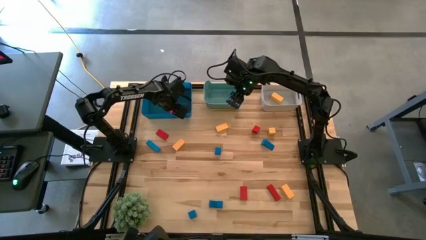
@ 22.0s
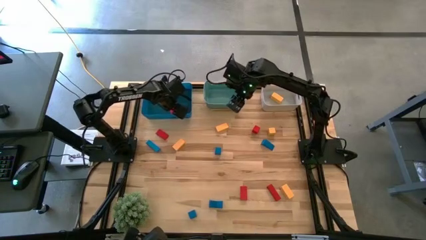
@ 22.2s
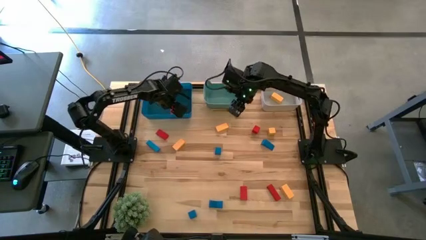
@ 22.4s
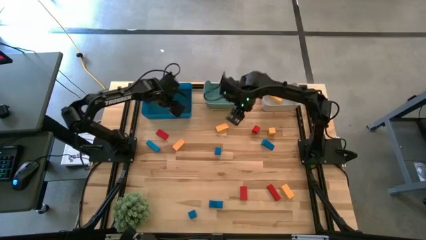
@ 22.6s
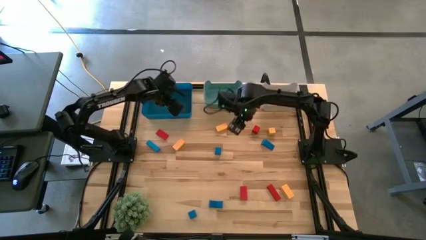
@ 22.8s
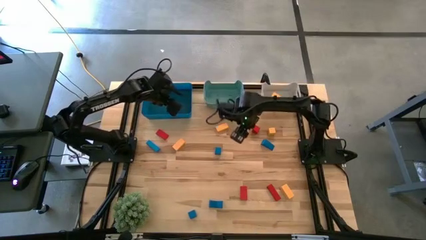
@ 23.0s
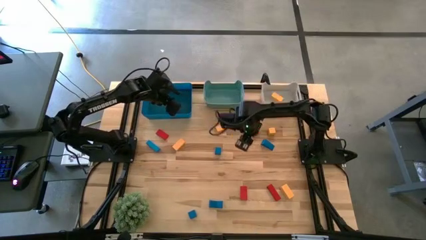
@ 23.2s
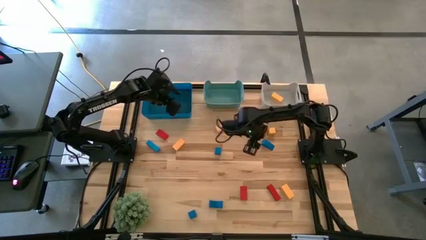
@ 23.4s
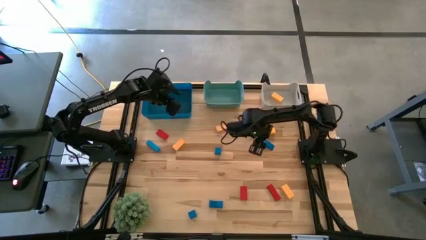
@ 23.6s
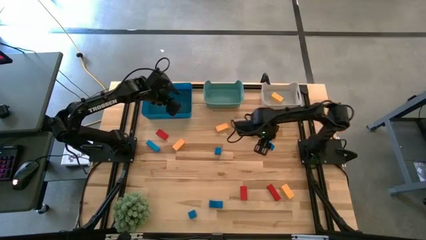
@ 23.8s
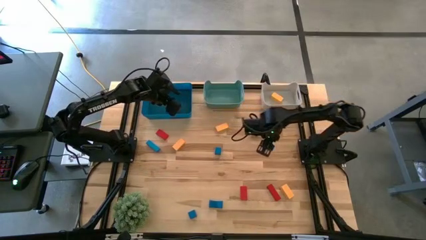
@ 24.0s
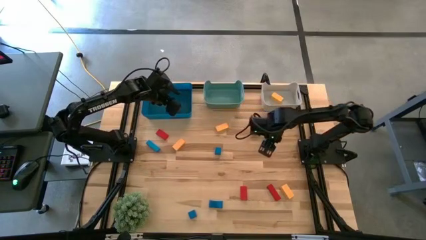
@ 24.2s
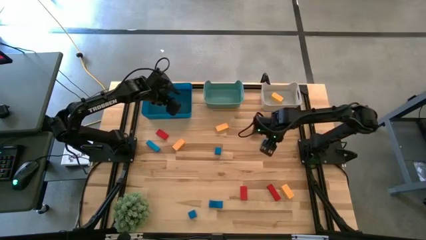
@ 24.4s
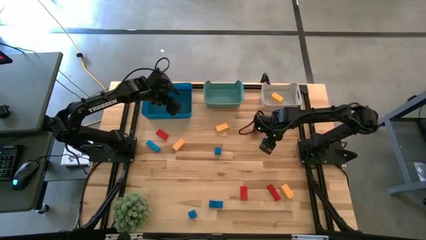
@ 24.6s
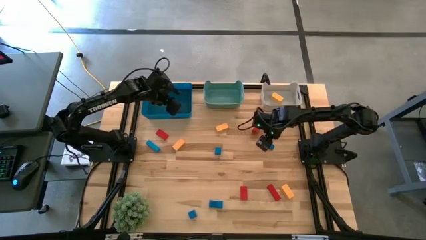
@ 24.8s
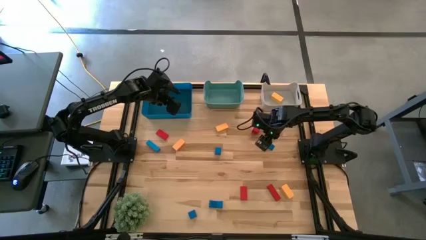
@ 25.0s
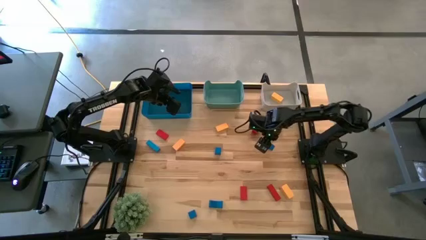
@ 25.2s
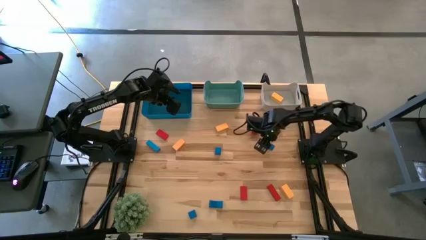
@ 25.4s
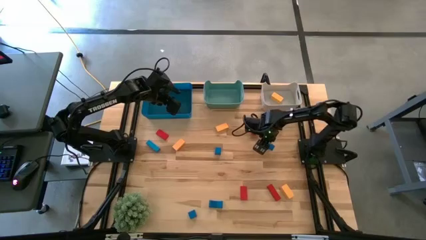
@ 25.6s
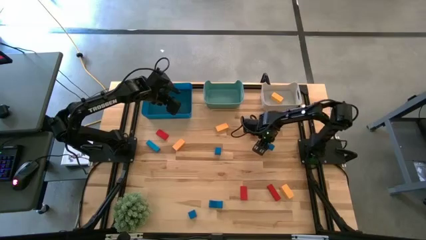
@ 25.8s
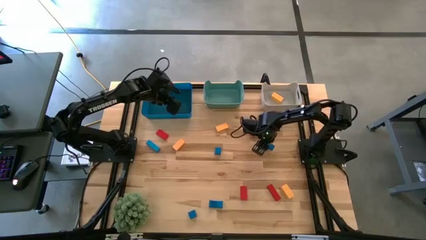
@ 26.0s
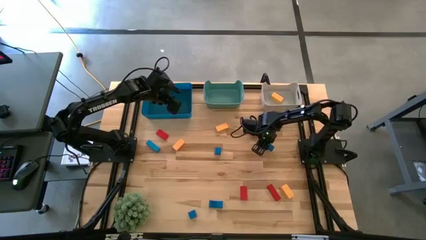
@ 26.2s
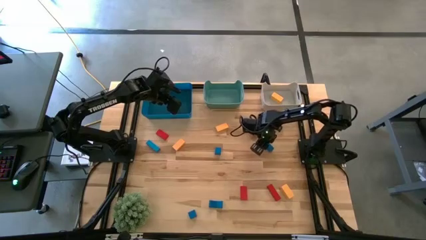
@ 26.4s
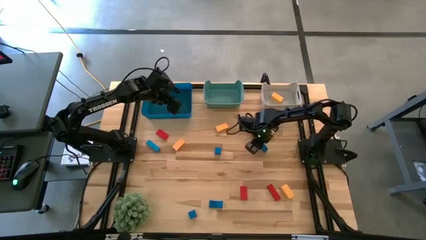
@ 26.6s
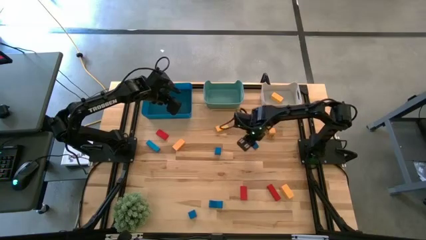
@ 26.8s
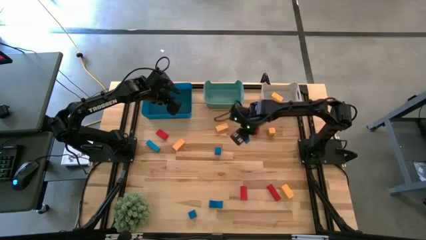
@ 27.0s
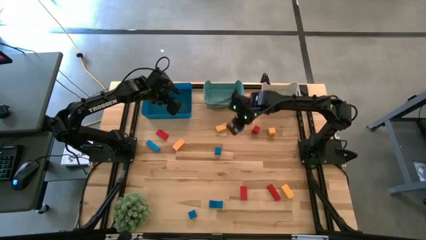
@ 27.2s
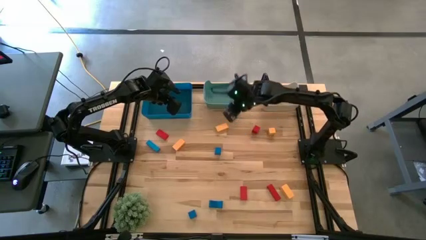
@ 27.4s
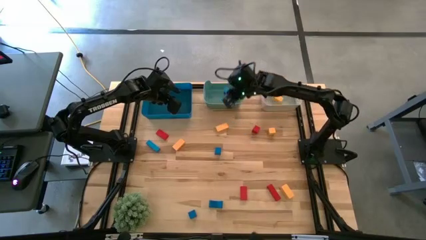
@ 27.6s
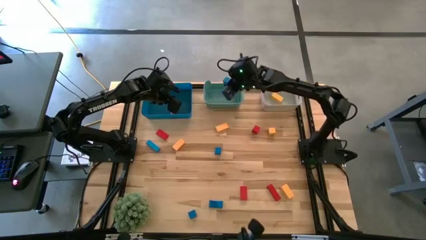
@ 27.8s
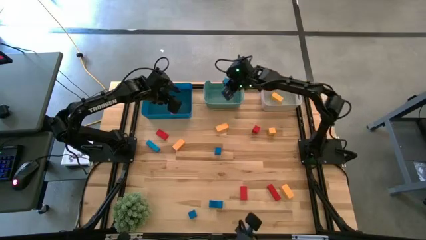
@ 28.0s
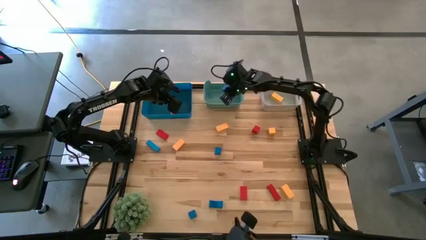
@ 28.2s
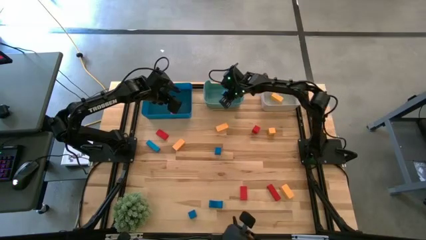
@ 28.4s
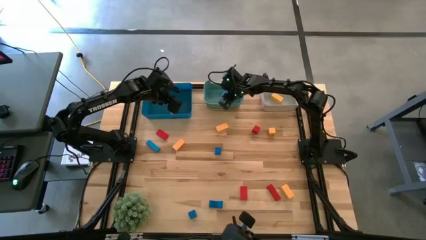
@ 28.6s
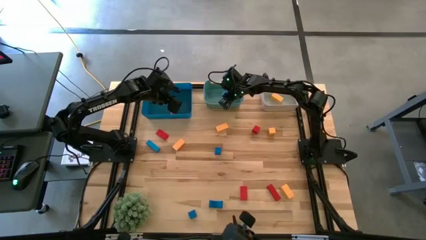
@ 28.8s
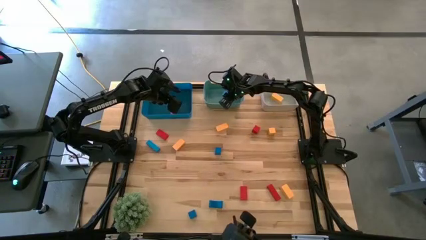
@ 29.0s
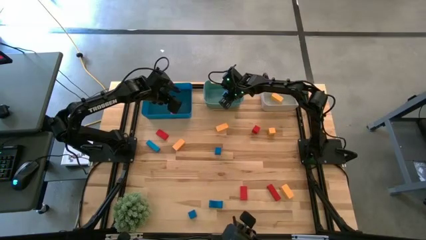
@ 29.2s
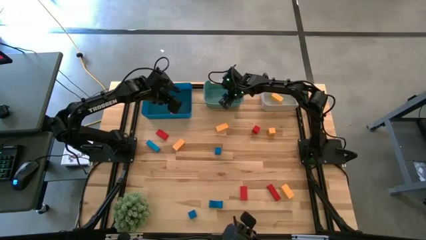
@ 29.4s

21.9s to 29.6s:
Task: Sort & place blocks by color
Put the blue block into the green bin

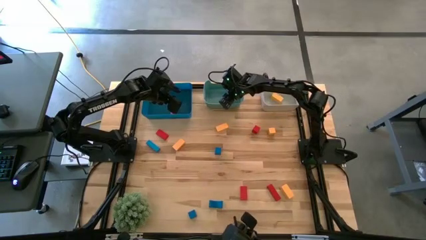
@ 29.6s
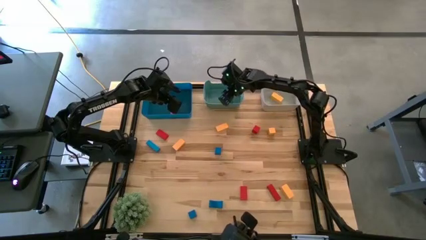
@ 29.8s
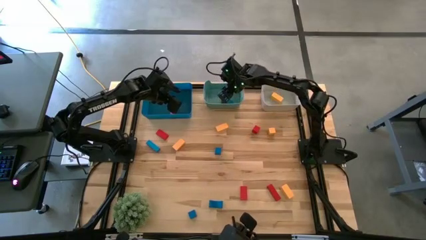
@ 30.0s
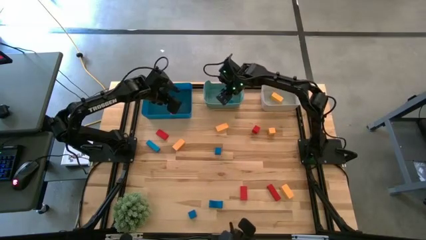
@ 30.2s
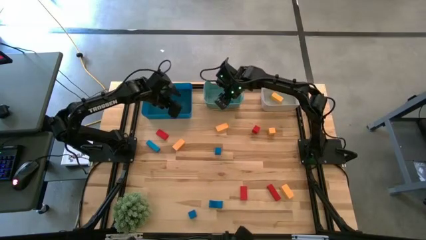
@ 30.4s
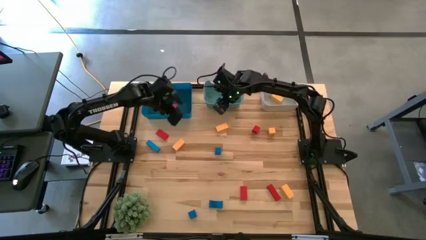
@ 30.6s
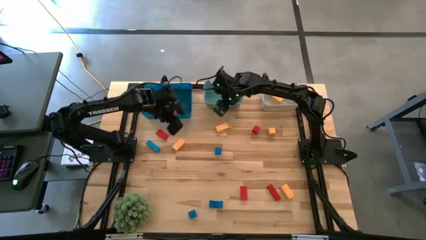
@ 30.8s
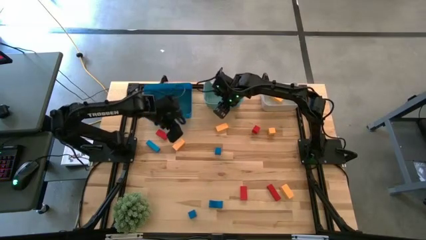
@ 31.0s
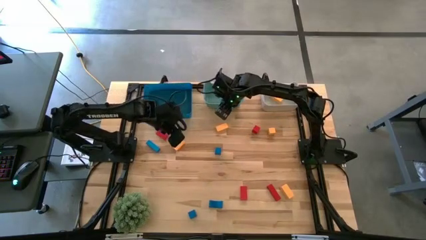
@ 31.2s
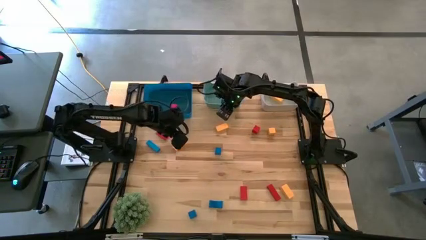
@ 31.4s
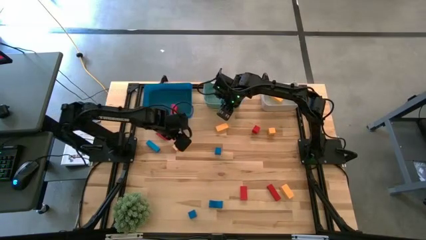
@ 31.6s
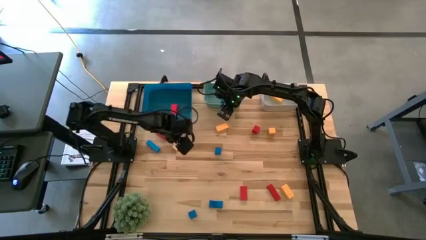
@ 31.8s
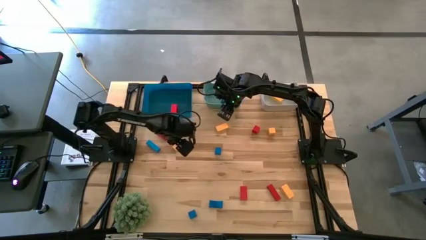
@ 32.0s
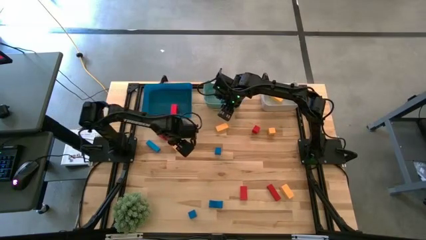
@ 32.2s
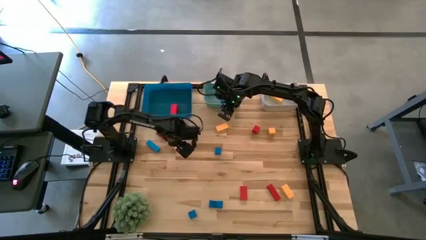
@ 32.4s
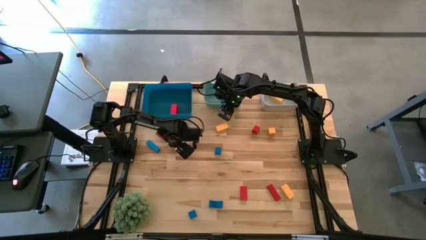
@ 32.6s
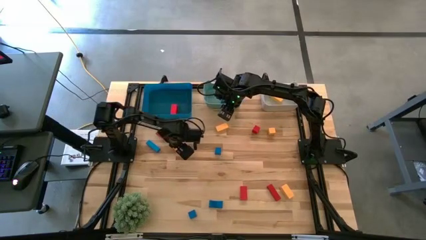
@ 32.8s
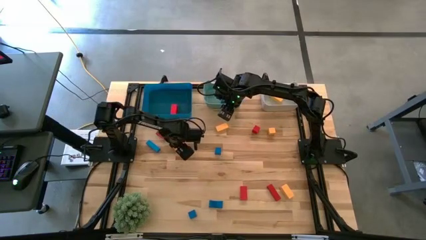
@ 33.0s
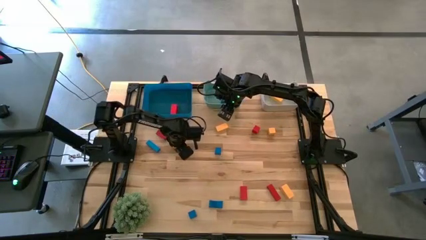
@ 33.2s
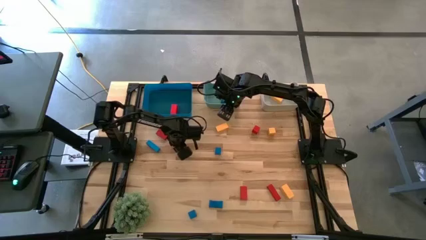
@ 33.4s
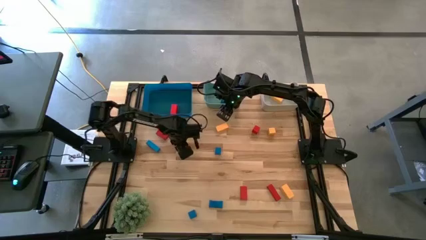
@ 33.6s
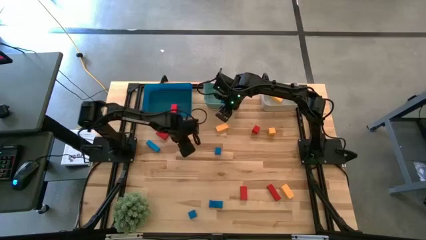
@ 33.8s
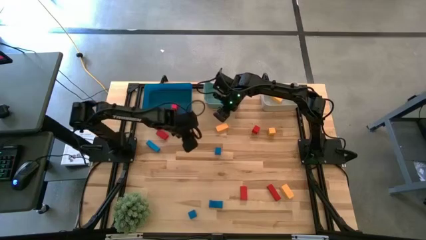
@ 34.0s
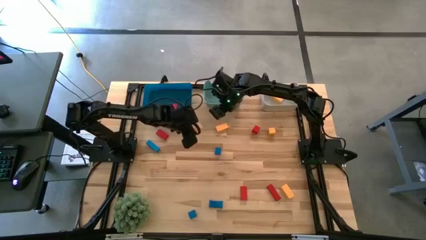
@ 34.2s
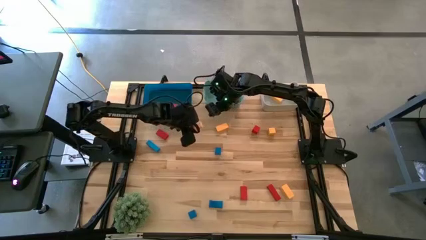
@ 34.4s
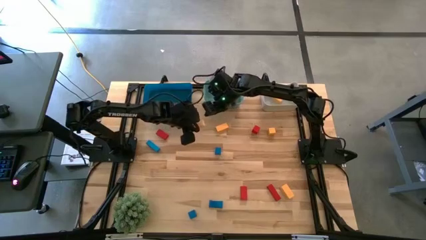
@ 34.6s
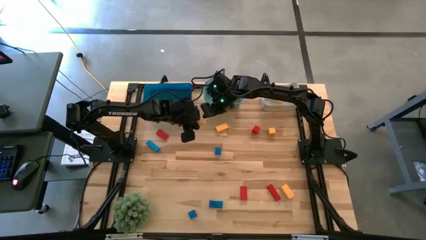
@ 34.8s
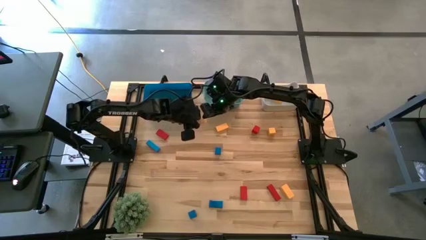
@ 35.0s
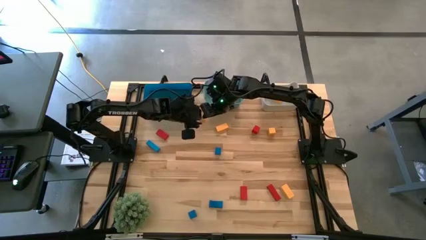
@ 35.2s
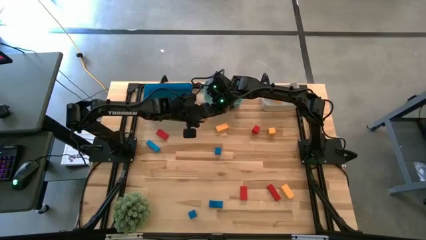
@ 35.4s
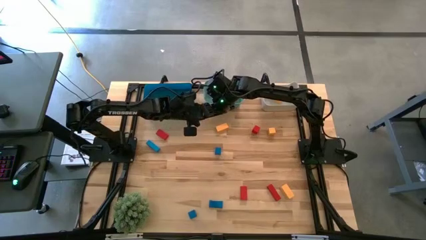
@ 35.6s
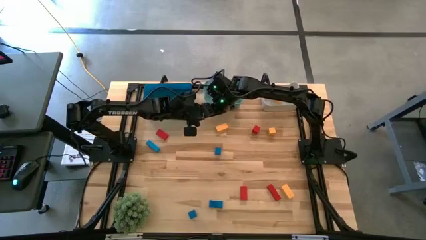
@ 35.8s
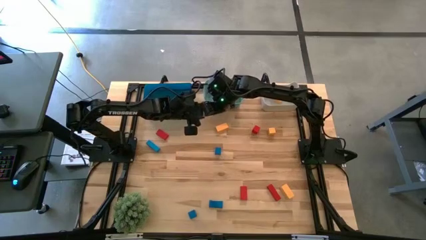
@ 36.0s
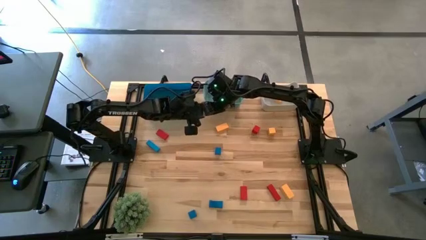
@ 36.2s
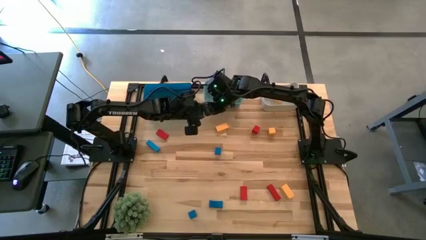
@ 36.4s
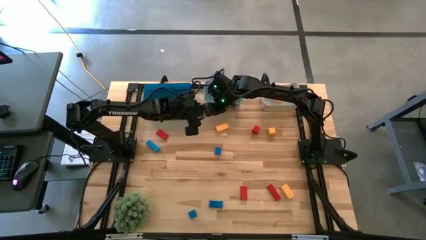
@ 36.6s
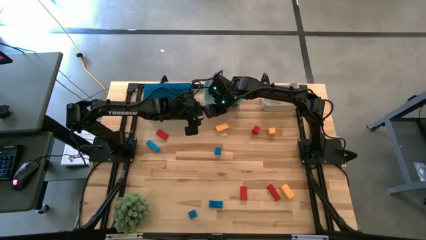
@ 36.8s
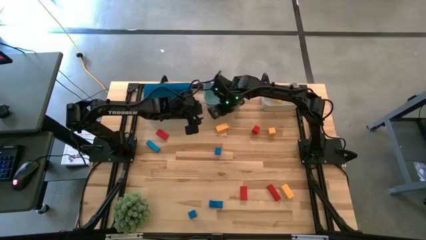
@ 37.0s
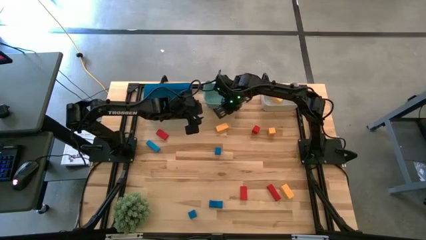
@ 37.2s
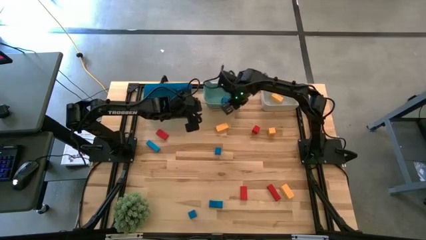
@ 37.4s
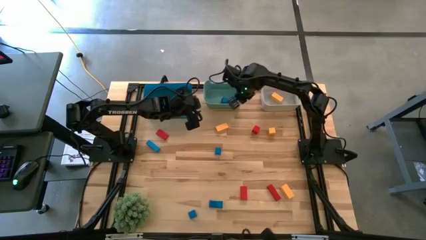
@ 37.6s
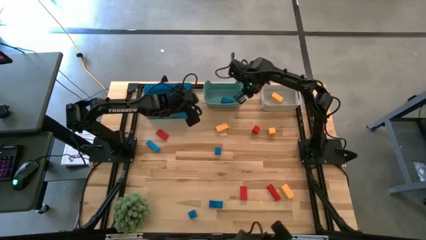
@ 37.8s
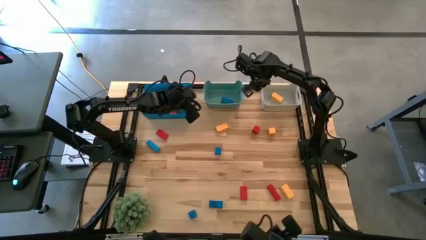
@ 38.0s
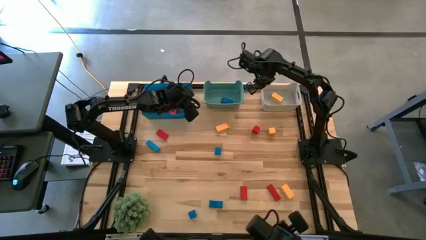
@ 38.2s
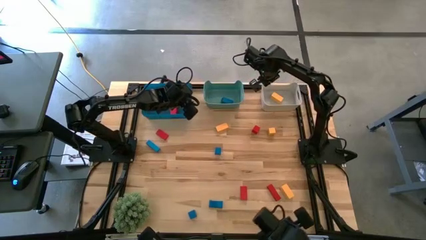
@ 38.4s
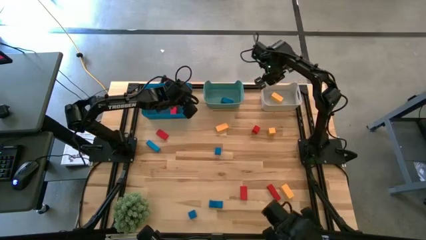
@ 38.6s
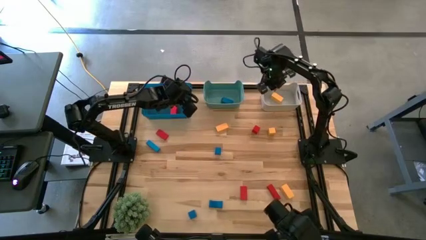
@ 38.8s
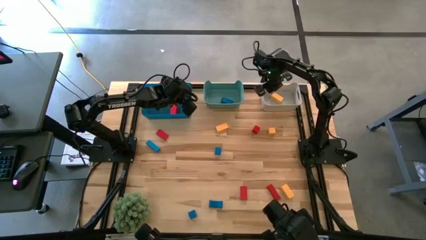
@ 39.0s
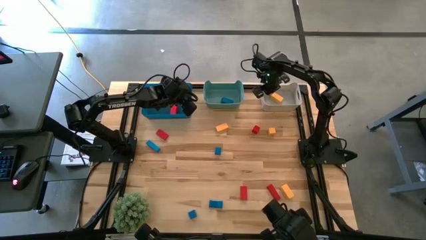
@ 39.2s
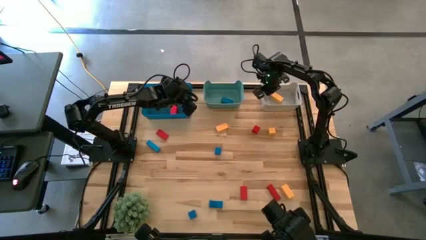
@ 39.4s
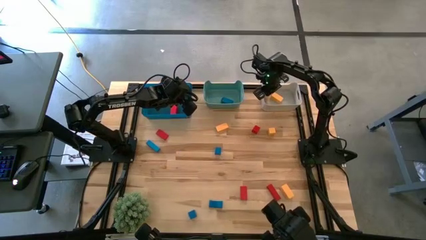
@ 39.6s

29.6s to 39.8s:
Put the yellow block into the gray bin
